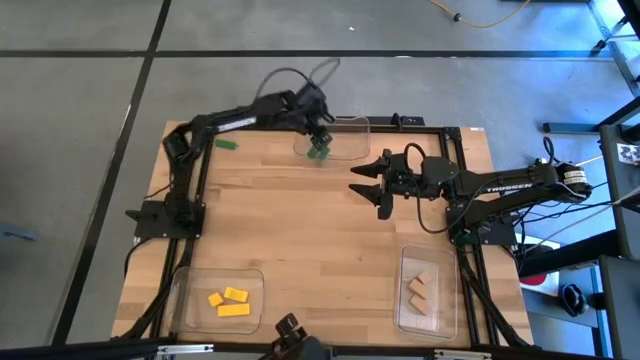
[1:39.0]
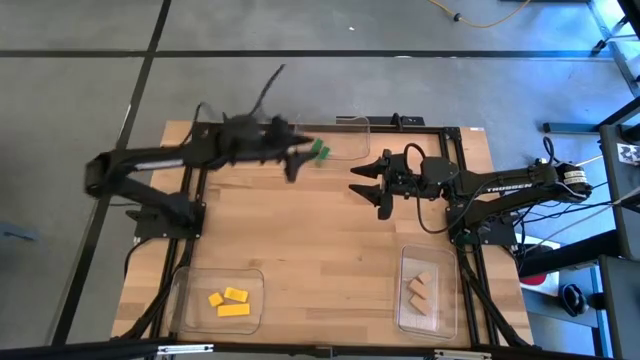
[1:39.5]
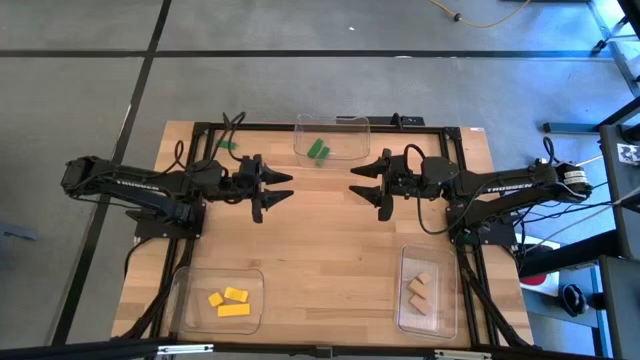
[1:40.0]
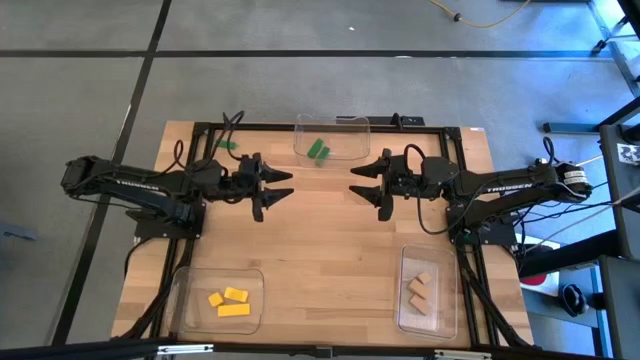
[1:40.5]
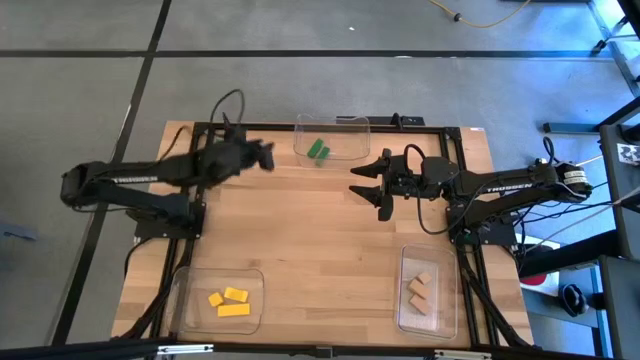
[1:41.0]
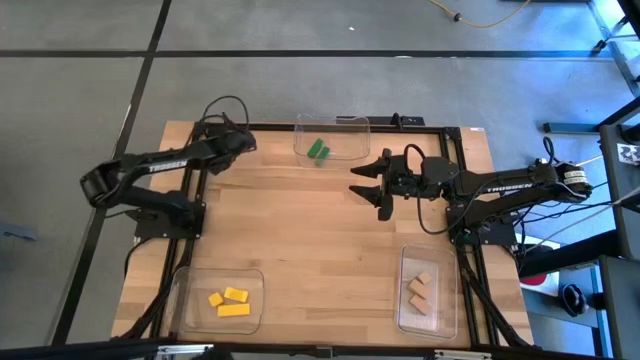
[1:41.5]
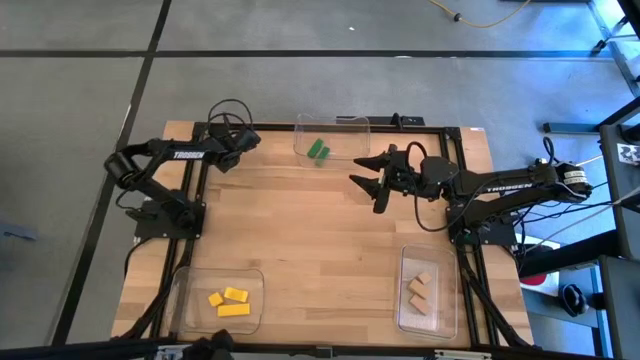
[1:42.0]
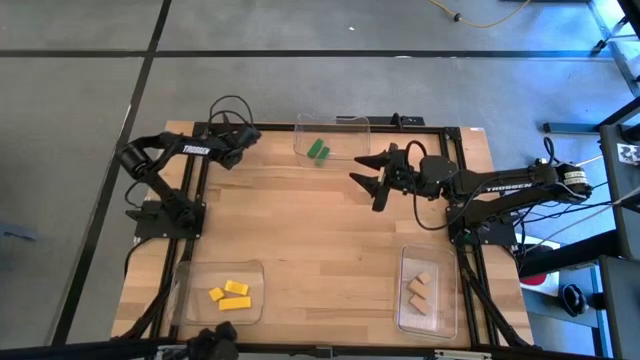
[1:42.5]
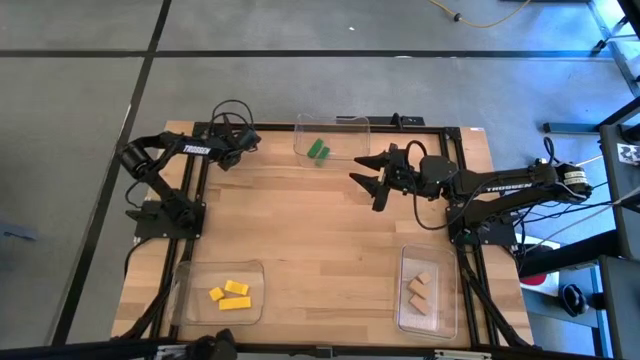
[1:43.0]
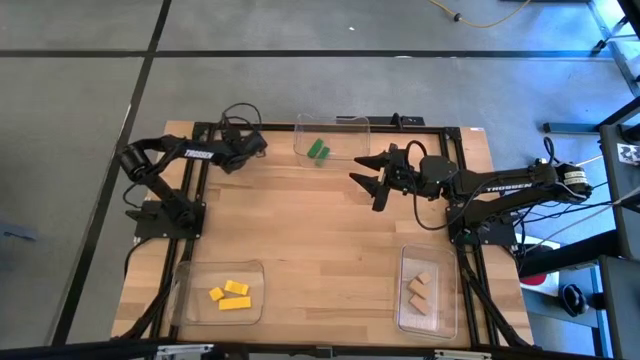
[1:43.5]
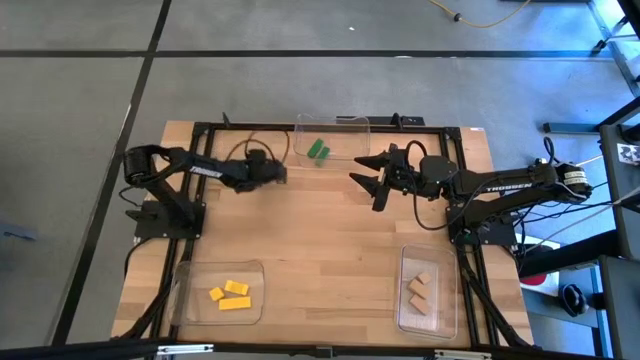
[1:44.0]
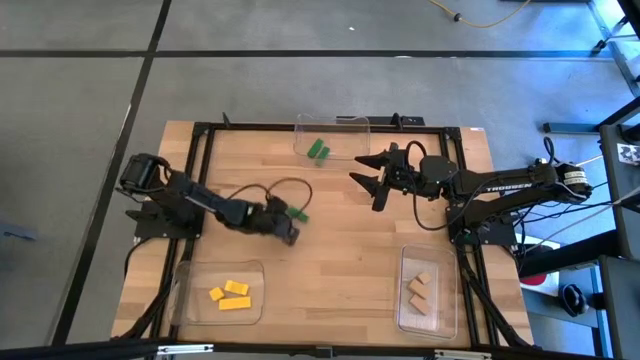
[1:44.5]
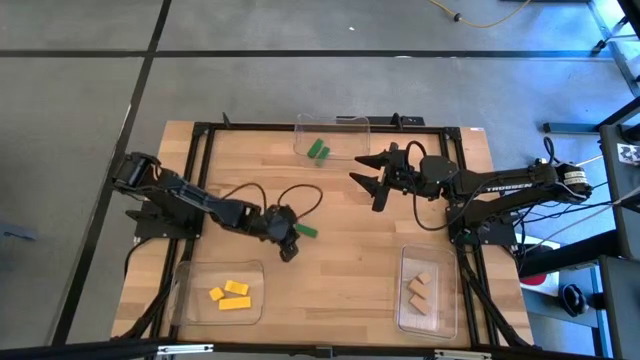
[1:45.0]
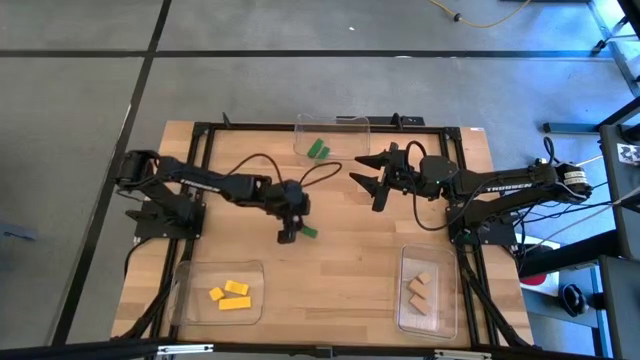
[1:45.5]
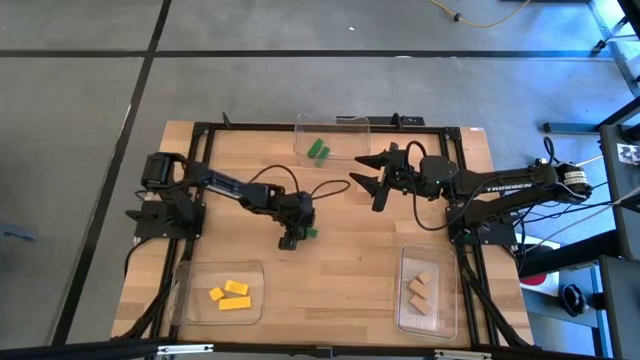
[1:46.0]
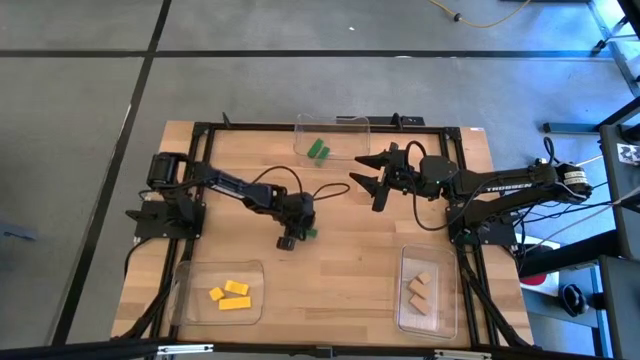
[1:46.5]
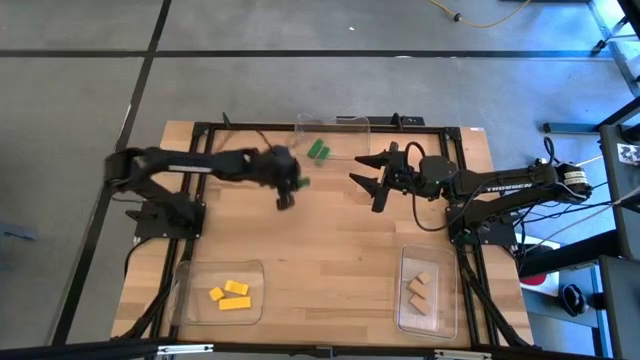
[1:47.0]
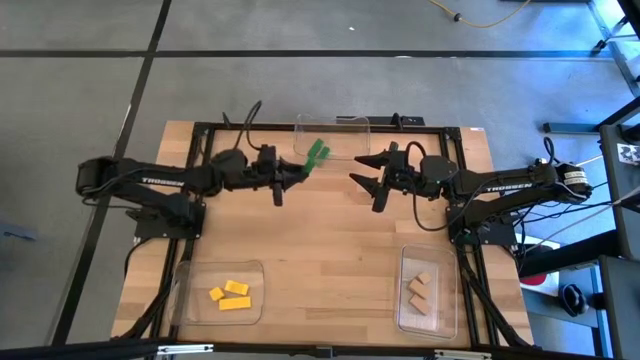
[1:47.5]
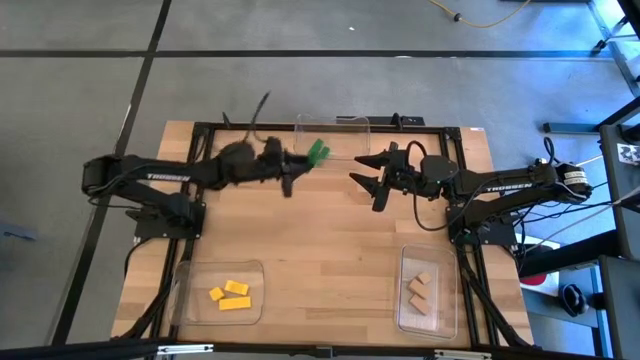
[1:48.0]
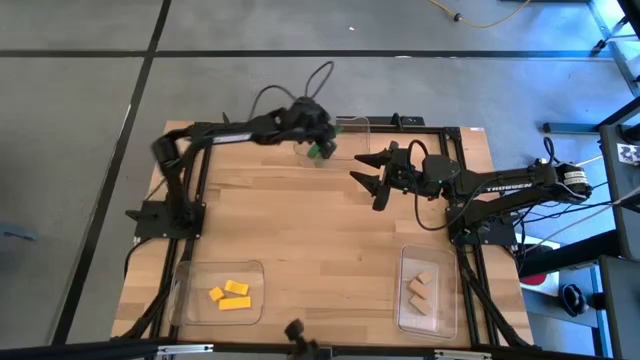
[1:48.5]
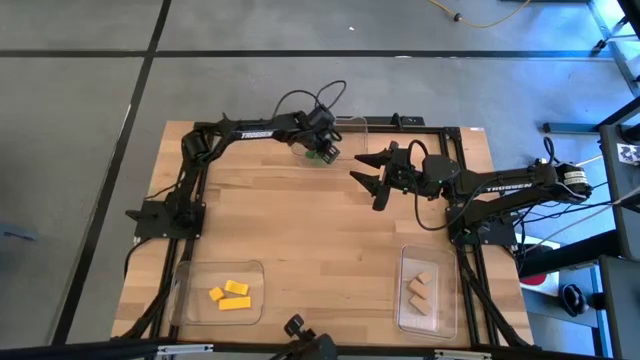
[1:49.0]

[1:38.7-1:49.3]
Task: Sort & place blocks by color
Put the green block into the top transparent bin

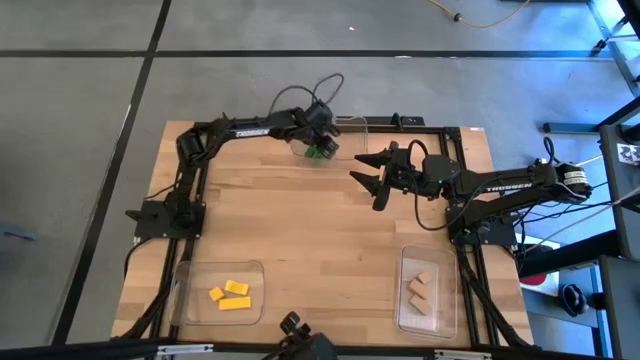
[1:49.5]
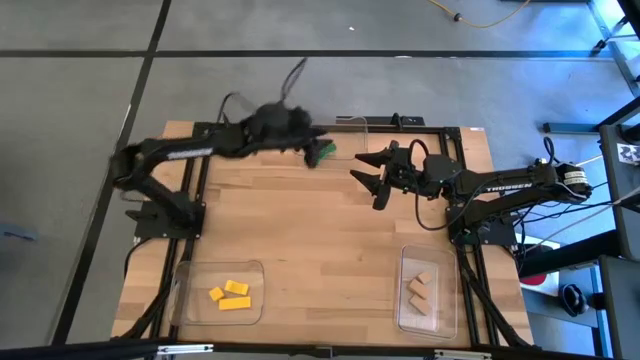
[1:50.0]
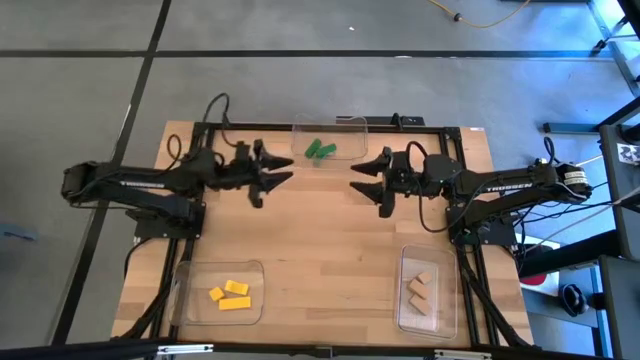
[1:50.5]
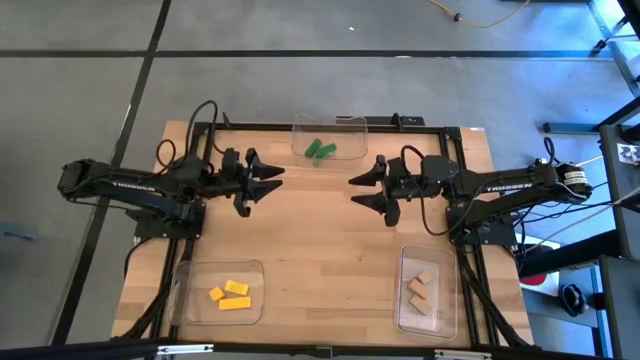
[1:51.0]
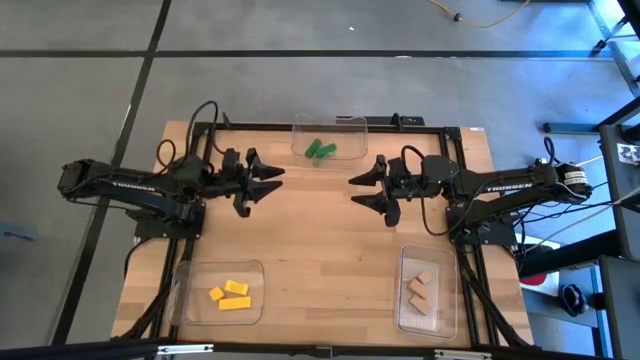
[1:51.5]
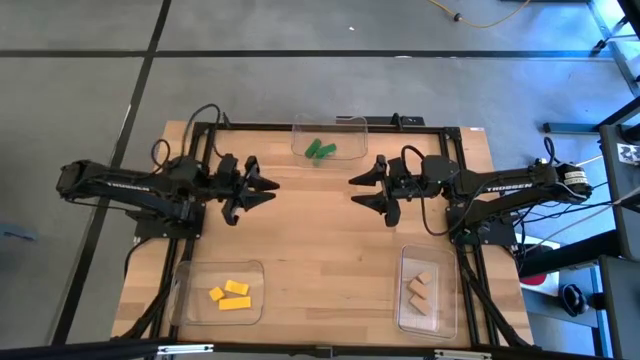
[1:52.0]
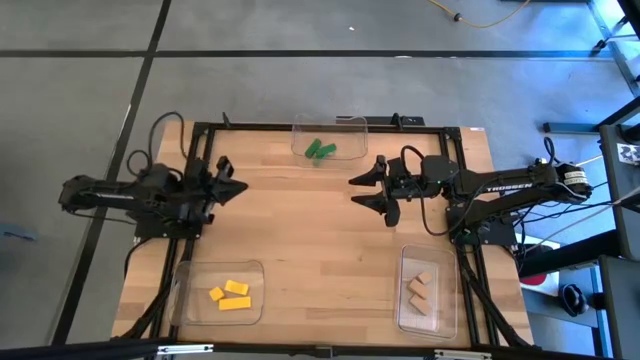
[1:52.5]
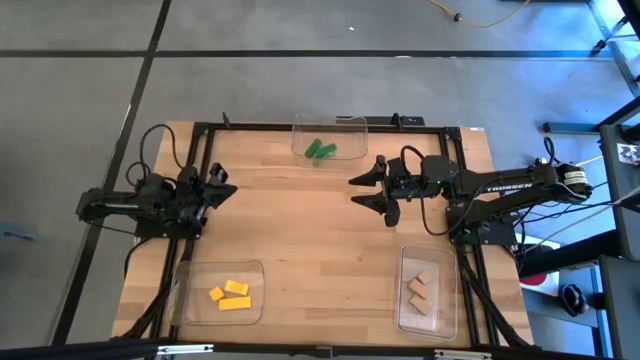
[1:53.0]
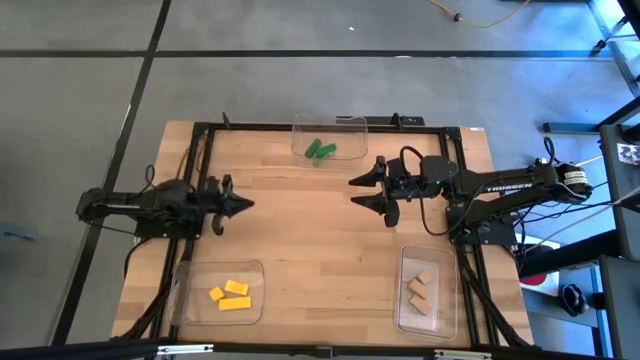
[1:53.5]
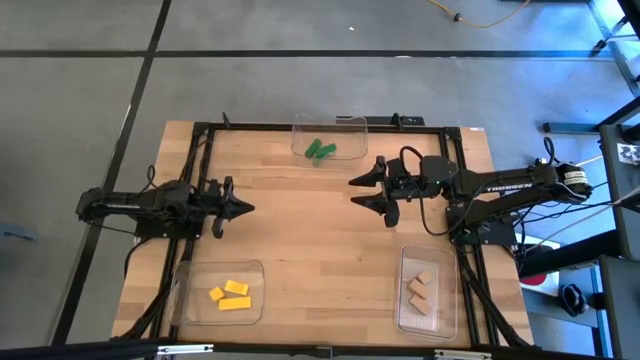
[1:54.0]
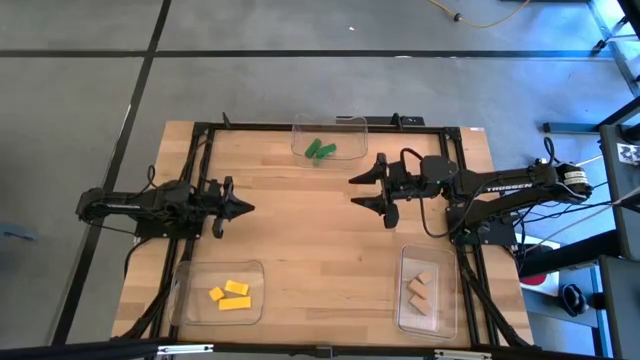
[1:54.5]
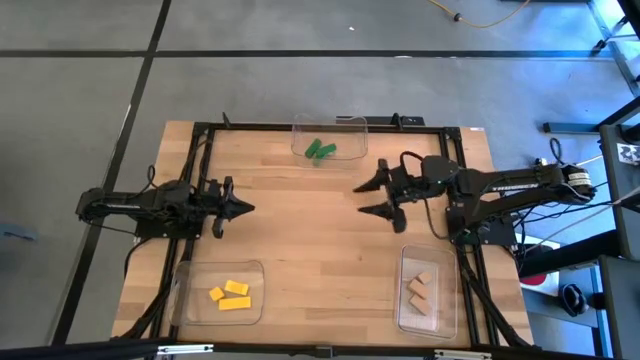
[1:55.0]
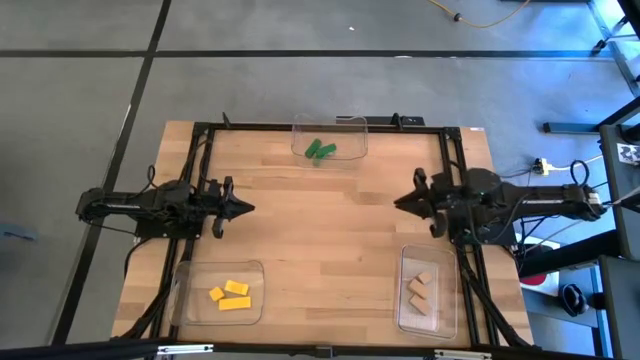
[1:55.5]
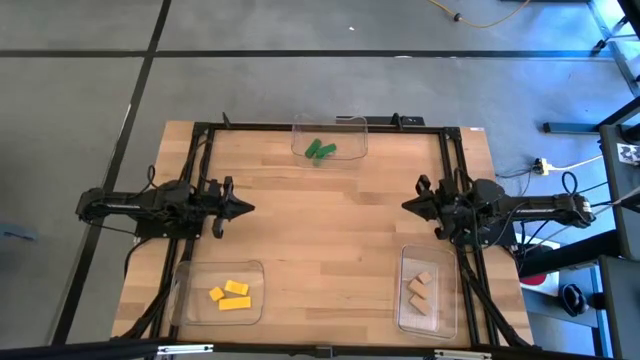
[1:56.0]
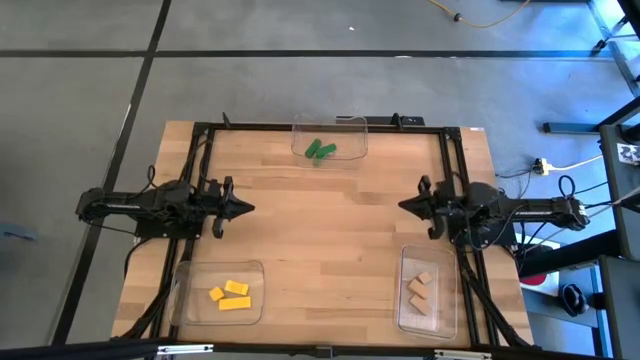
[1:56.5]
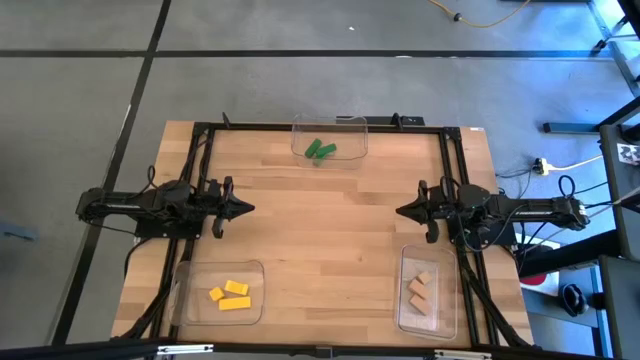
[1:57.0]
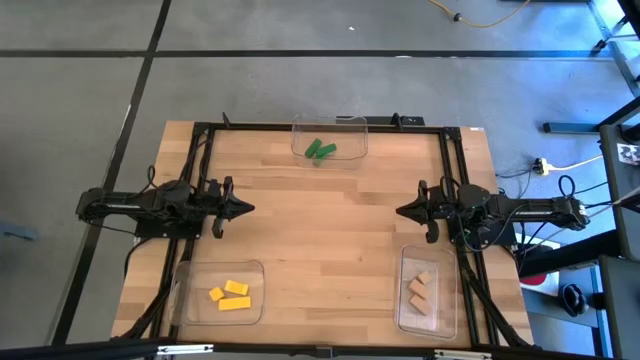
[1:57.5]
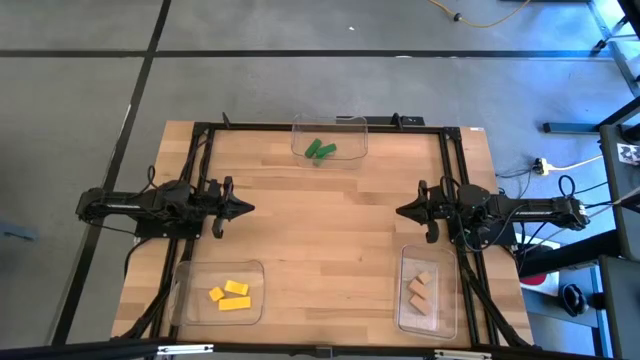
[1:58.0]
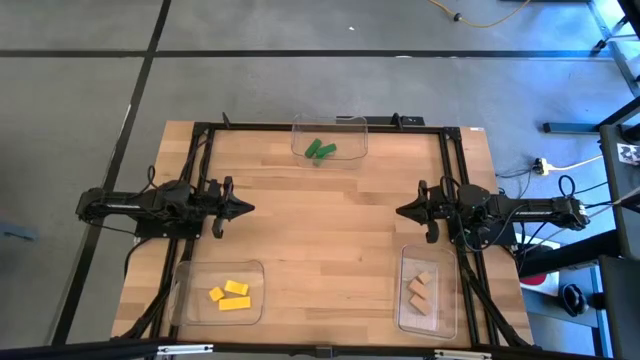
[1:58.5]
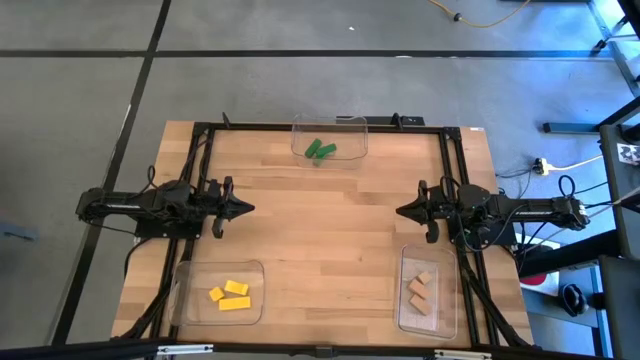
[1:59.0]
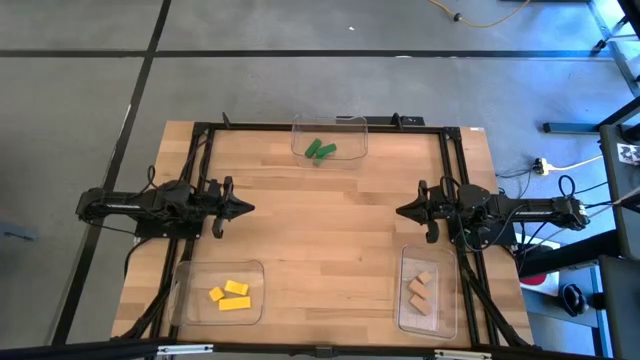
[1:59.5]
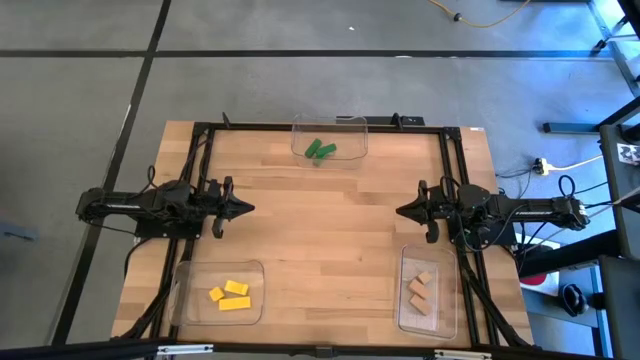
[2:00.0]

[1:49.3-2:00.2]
Return to Home Position
